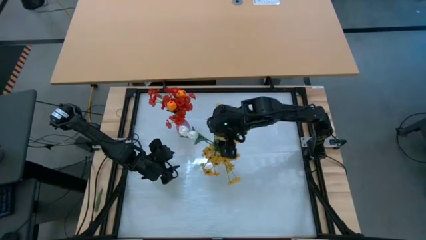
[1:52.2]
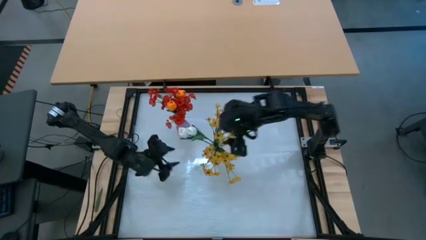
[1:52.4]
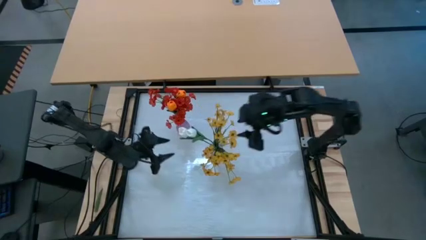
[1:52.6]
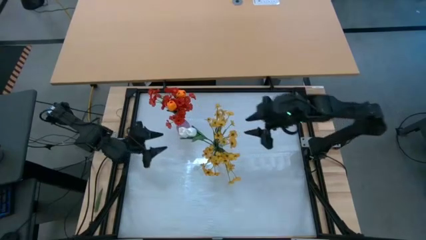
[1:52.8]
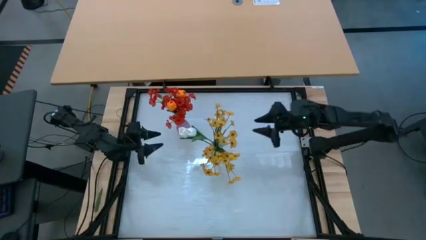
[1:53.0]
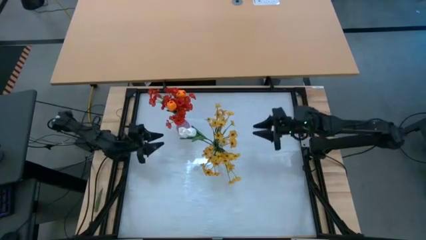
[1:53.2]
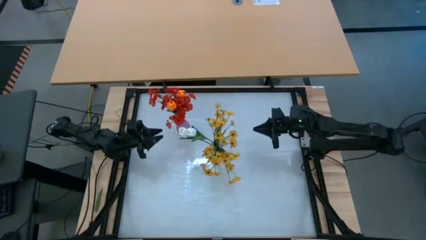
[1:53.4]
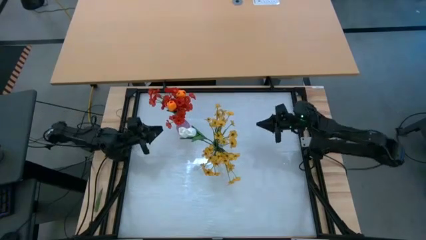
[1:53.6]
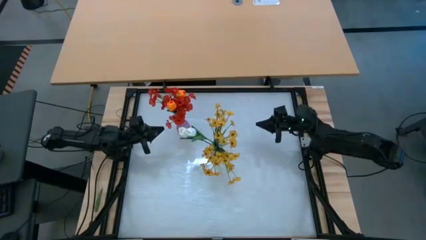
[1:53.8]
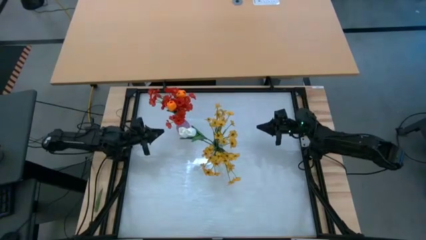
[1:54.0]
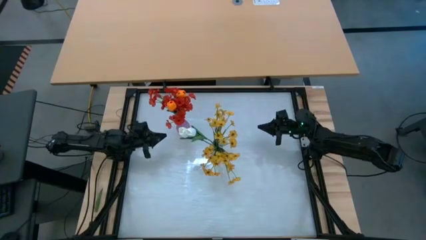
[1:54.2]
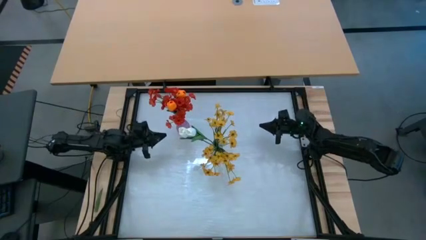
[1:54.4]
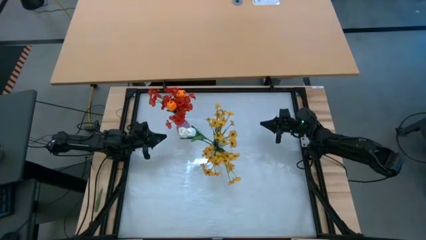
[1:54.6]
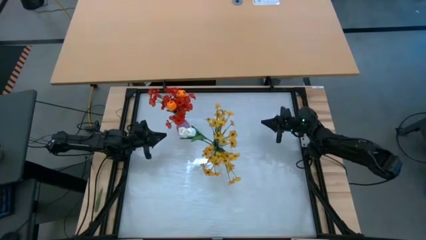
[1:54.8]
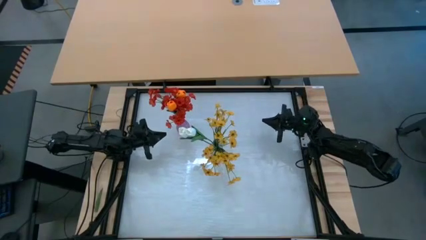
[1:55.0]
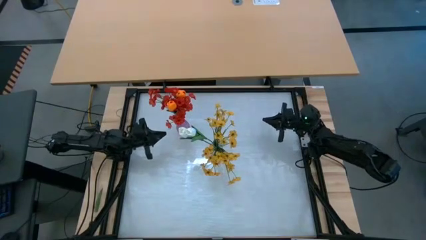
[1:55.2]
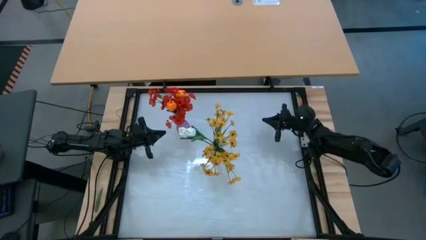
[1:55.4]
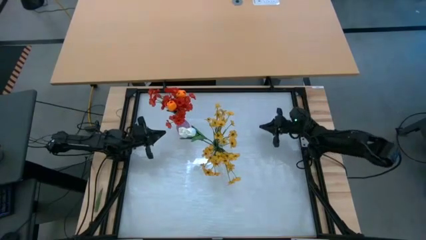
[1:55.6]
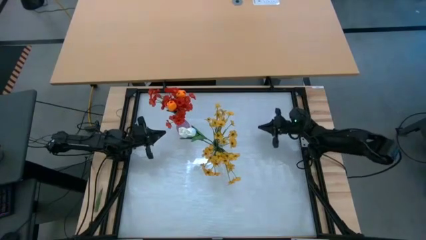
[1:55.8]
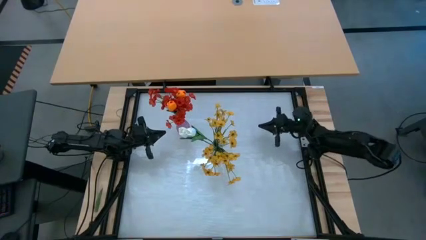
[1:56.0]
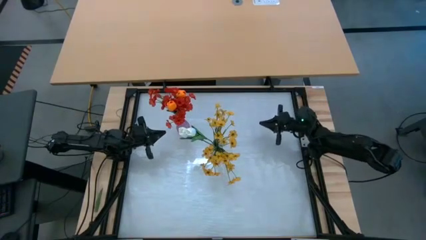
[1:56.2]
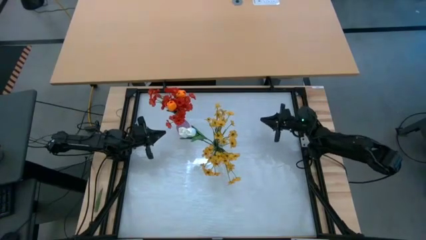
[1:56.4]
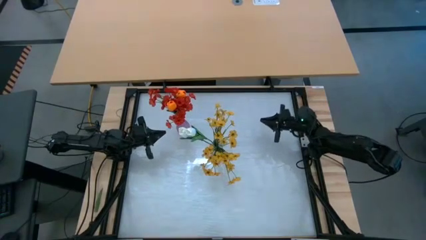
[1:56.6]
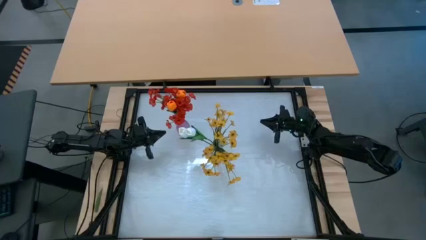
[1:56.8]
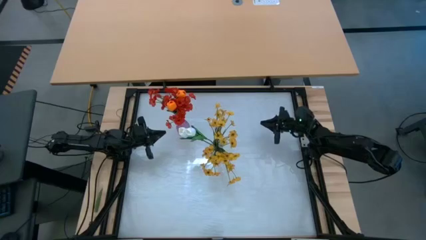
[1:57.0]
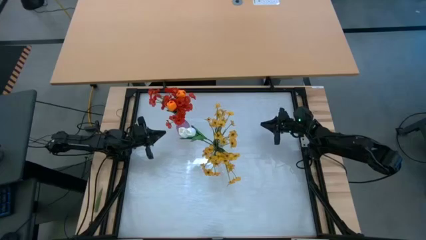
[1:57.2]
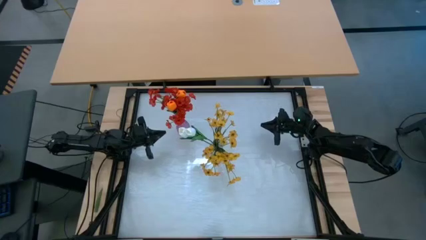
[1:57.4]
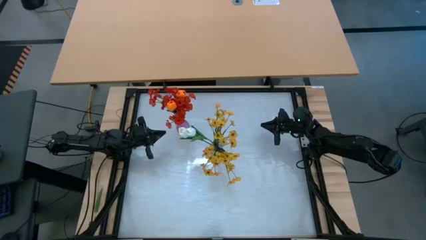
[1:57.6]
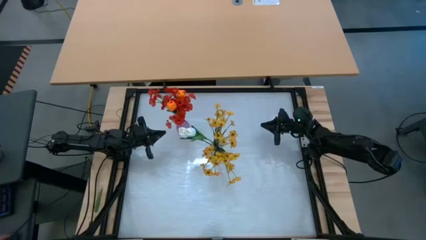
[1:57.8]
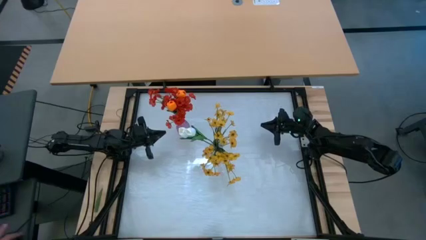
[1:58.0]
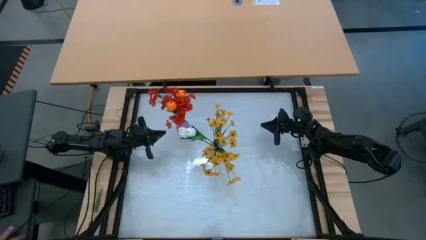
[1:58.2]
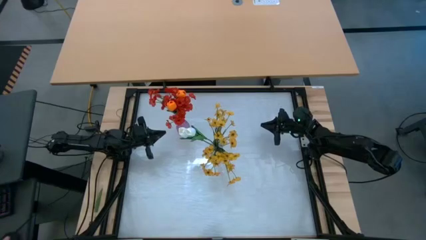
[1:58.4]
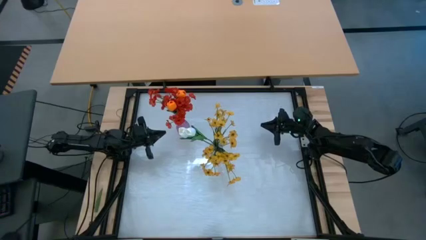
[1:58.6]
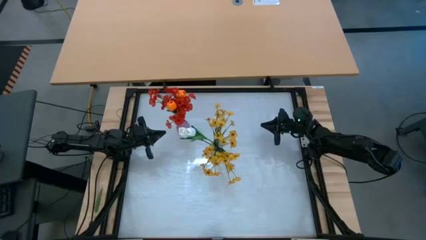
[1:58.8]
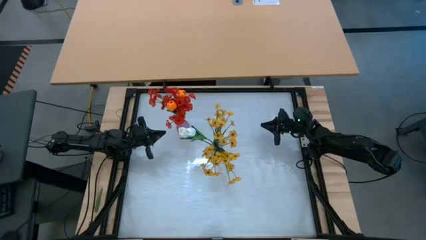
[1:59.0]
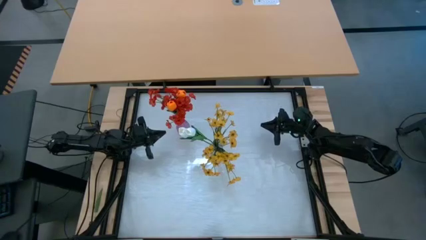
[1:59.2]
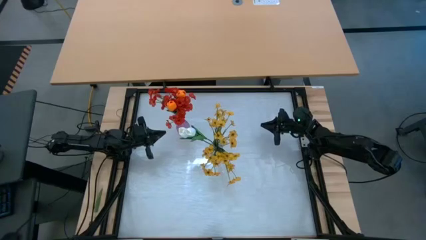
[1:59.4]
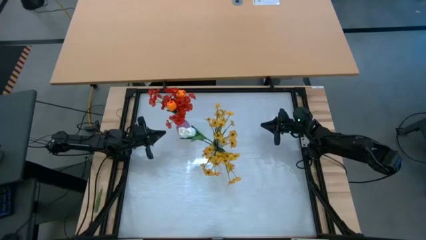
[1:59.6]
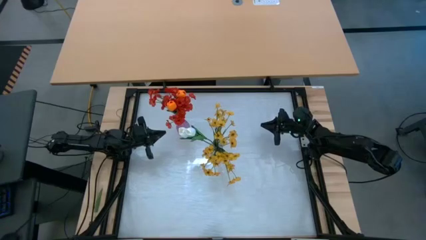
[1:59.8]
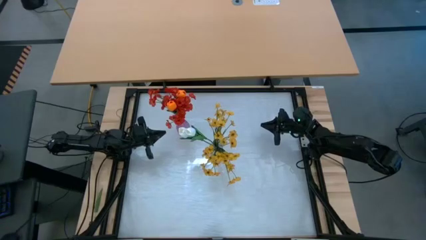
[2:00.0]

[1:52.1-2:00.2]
Task: Sort flowers into vase by color
Return to Home Position

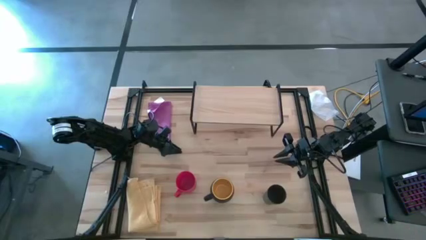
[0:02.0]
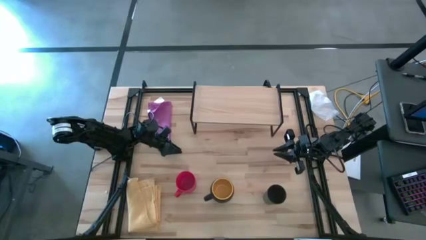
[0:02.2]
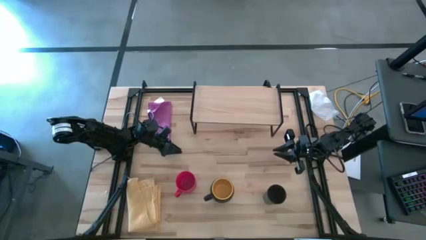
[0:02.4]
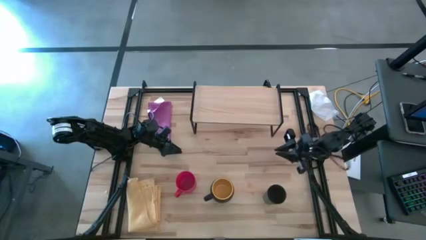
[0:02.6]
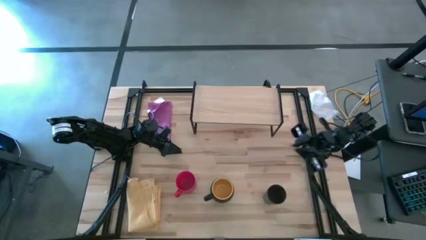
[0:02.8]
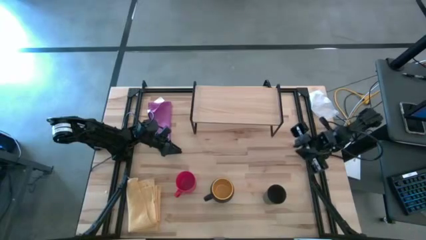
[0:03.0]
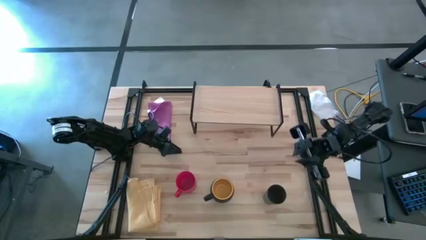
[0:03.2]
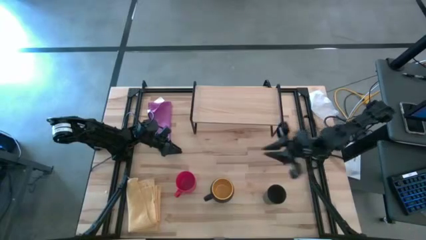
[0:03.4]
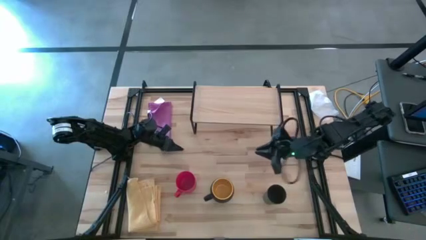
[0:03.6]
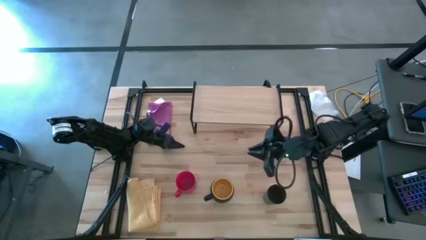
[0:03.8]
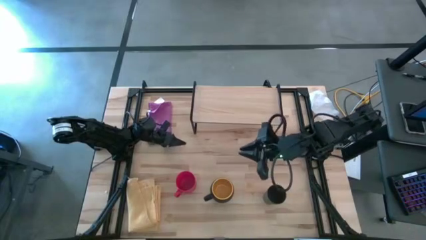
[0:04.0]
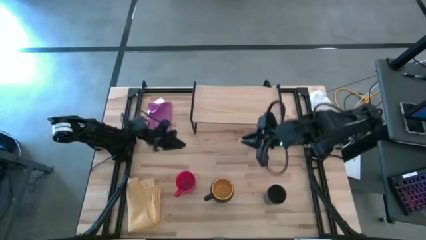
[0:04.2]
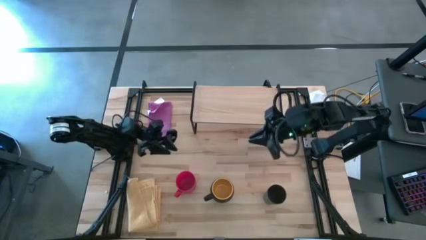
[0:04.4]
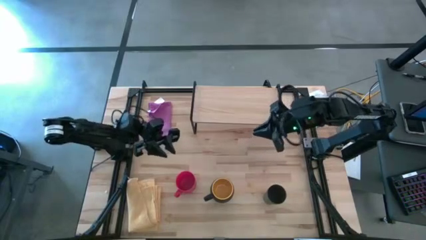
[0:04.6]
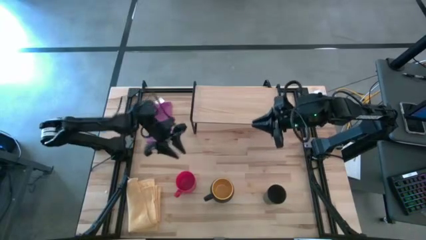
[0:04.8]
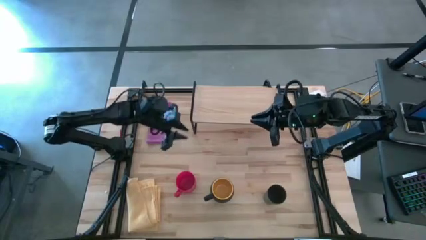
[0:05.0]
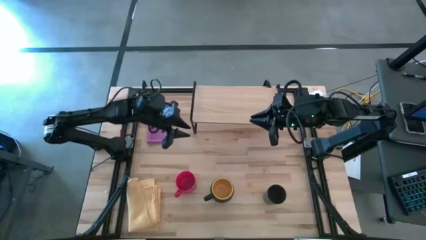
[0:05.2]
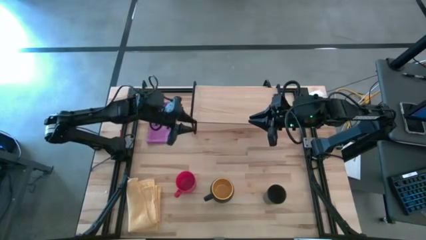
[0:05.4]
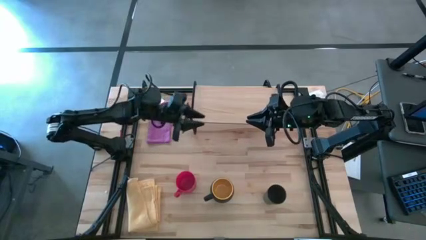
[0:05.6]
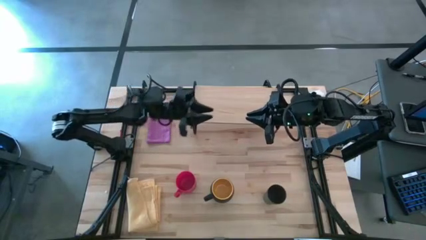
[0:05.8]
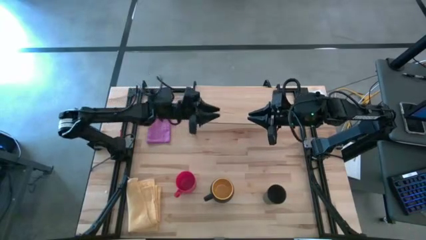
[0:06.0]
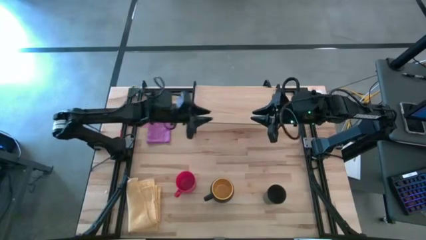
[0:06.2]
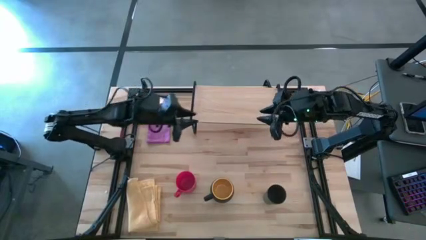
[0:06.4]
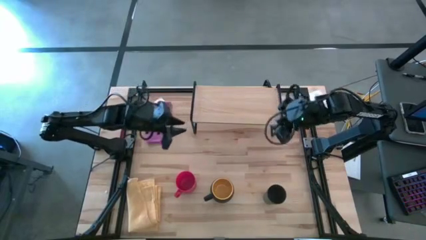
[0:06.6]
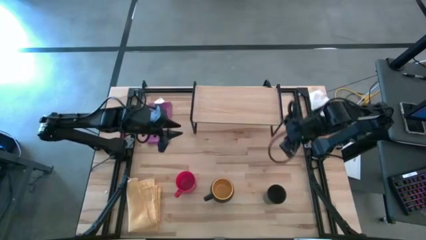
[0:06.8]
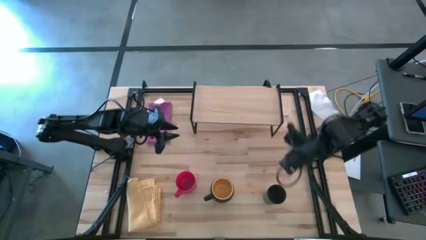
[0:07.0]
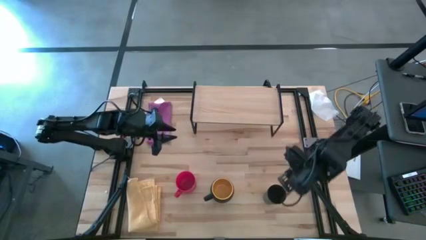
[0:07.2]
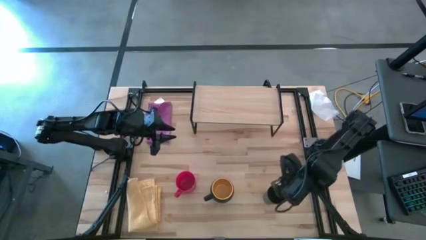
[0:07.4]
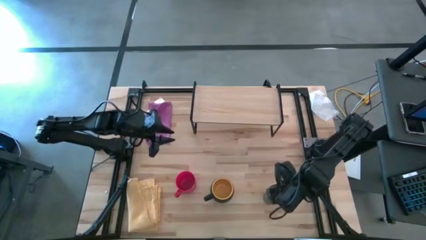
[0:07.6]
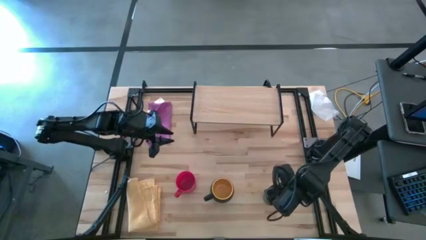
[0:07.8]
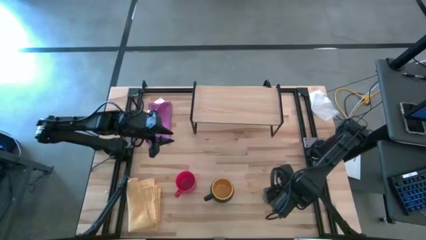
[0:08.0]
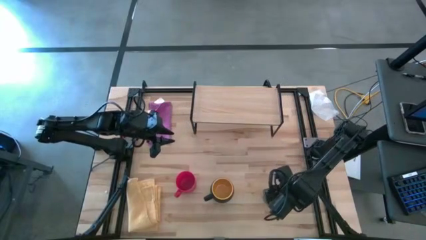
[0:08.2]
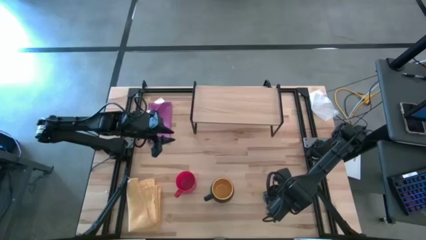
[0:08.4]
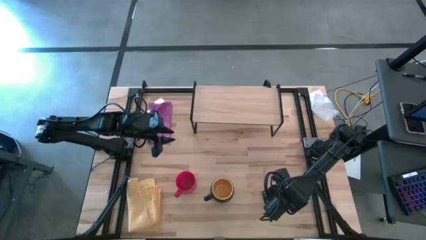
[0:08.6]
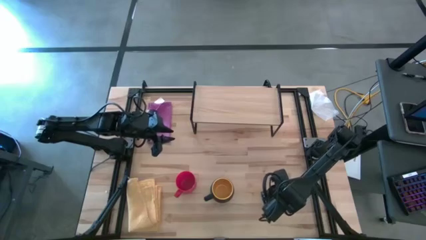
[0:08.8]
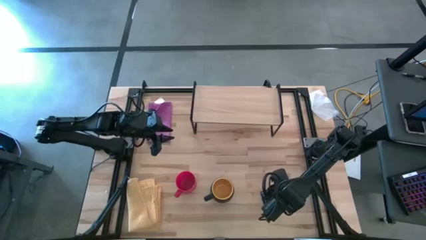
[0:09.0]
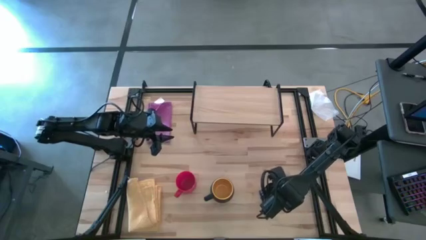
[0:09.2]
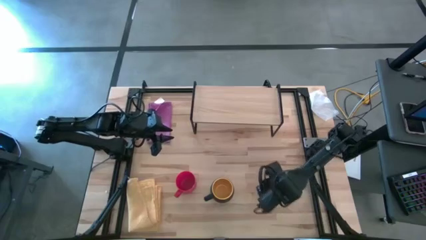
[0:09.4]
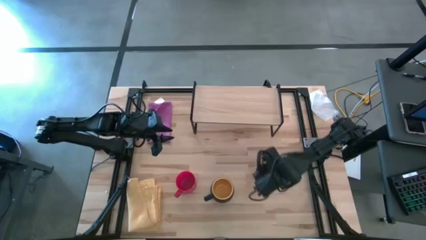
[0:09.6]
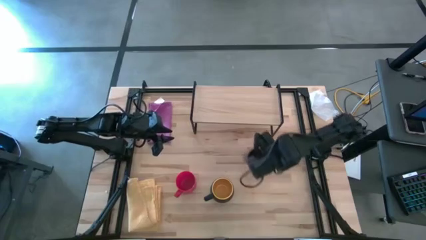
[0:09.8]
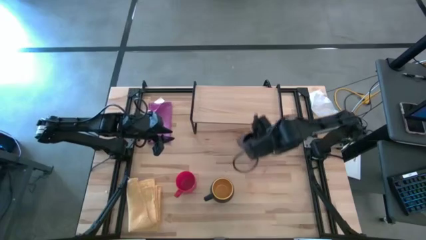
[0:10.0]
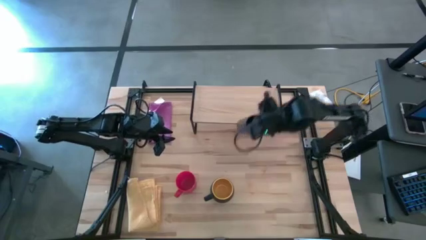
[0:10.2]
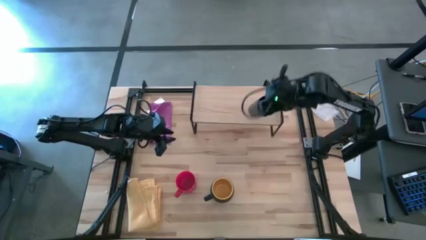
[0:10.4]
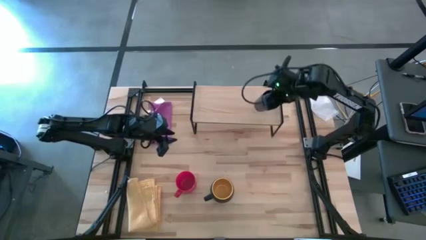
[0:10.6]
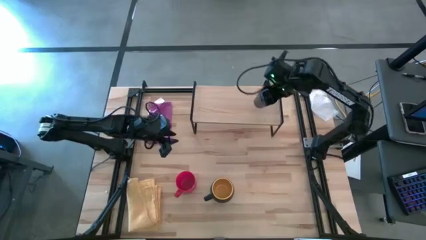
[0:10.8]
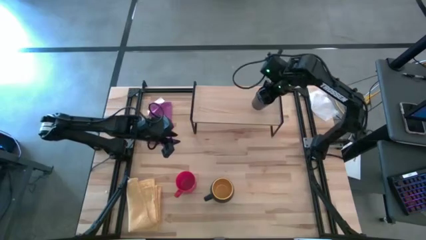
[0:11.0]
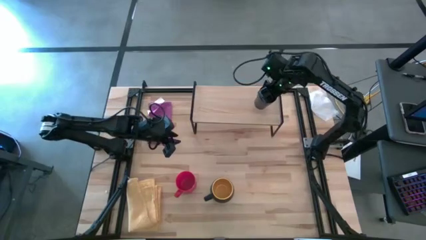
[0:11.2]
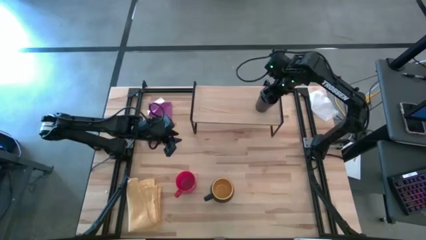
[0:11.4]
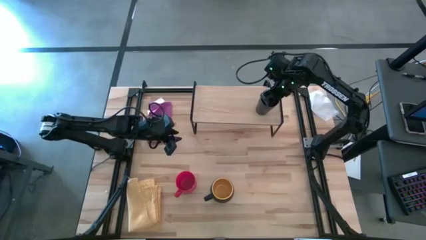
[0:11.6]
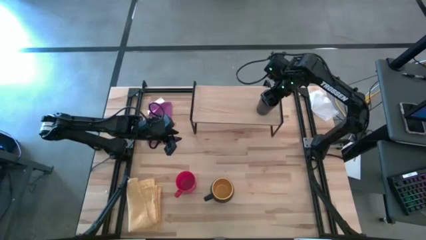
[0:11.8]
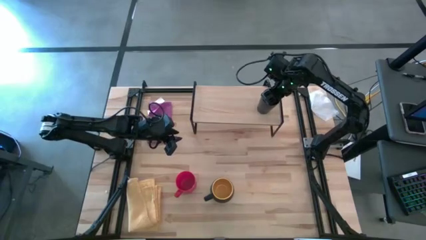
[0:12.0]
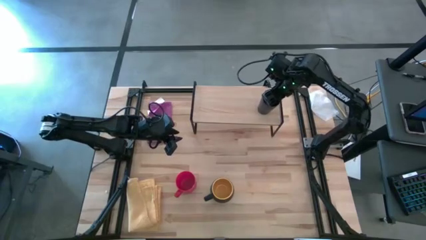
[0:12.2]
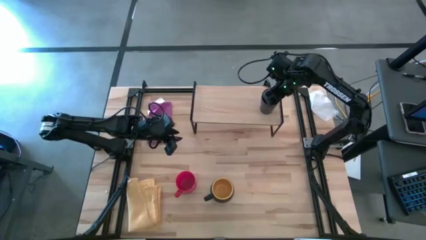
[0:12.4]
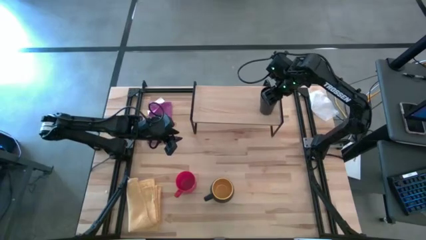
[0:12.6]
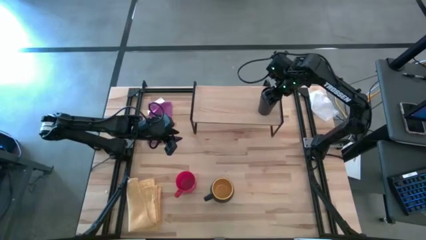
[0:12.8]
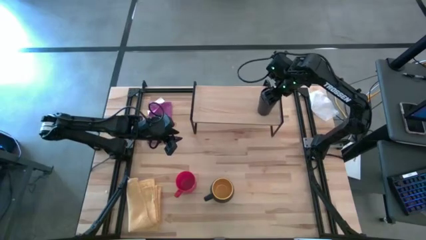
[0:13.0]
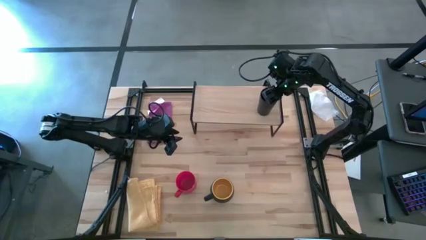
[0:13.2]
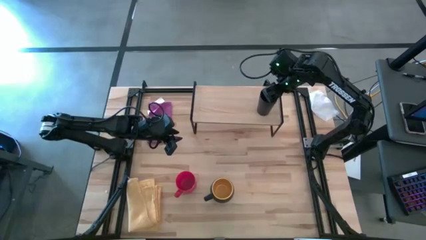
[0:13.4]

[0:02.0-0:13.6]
Task: Stack small to large cups/mugs on shelf
Put the black cup on the shelf
